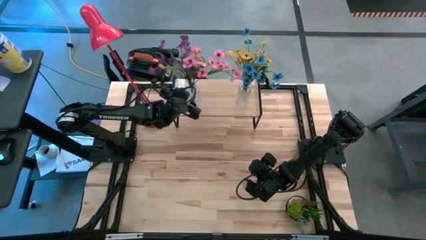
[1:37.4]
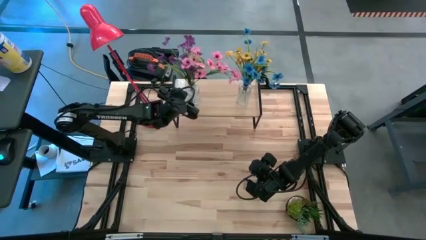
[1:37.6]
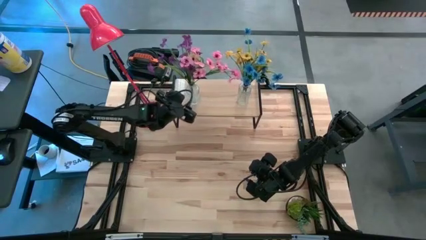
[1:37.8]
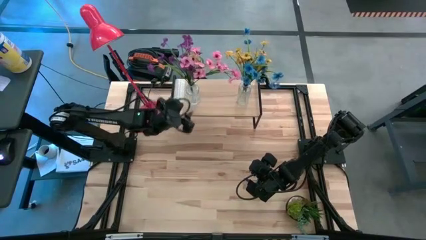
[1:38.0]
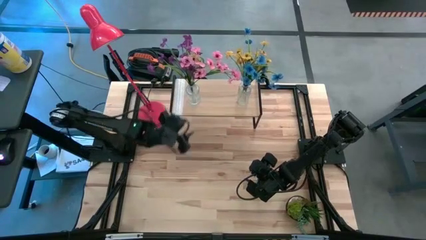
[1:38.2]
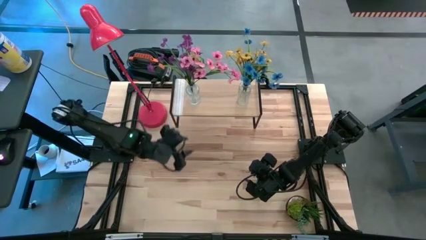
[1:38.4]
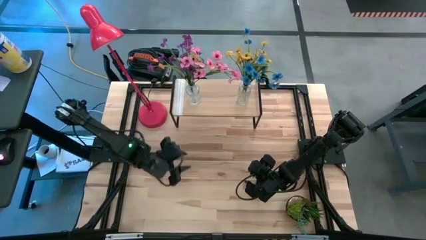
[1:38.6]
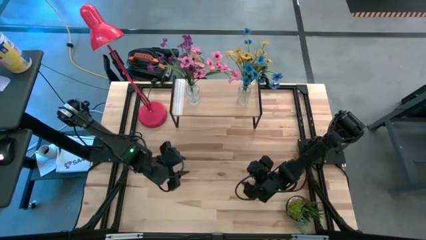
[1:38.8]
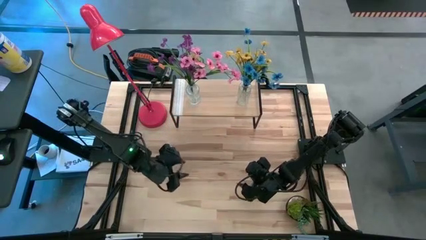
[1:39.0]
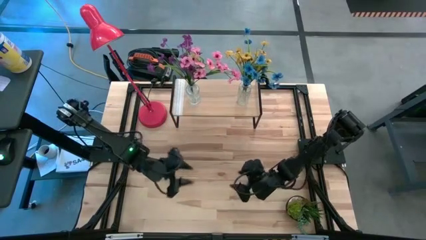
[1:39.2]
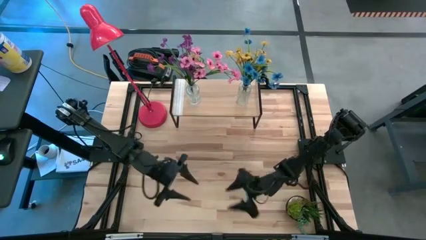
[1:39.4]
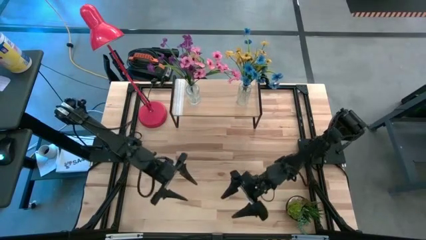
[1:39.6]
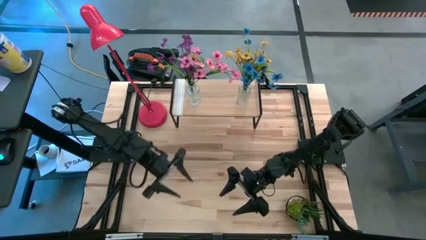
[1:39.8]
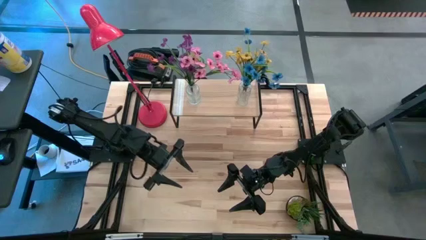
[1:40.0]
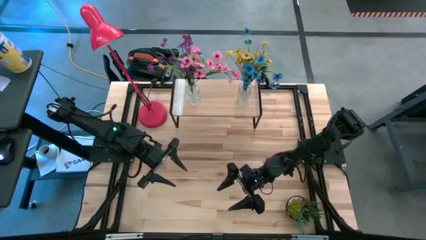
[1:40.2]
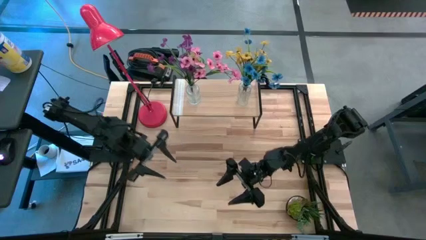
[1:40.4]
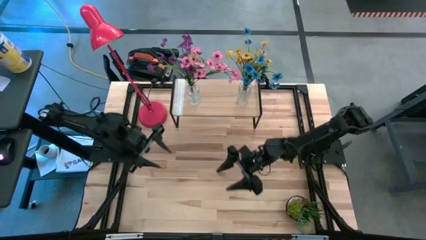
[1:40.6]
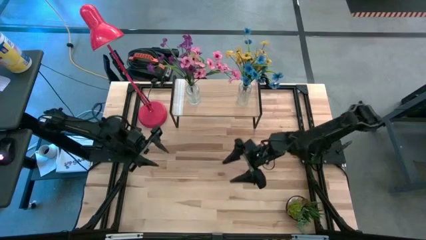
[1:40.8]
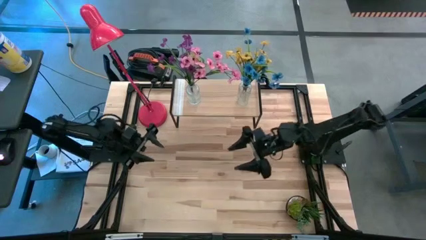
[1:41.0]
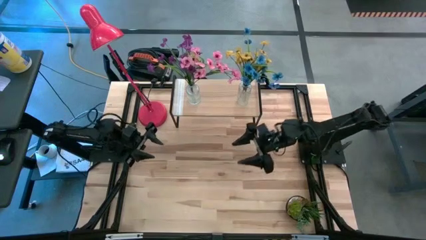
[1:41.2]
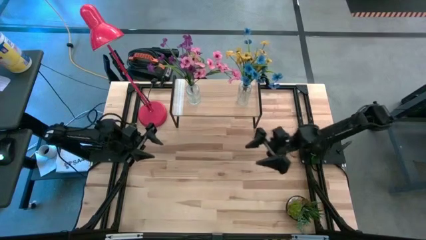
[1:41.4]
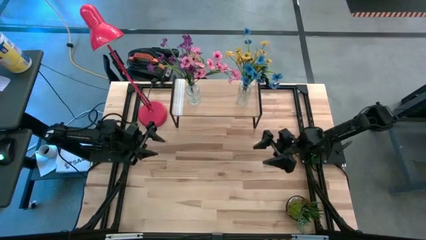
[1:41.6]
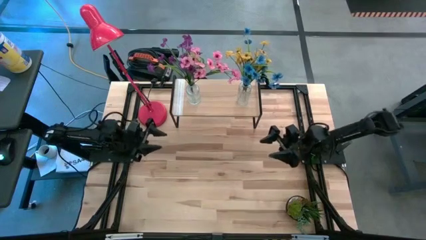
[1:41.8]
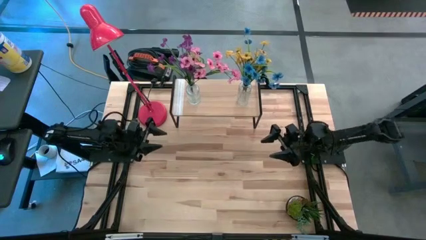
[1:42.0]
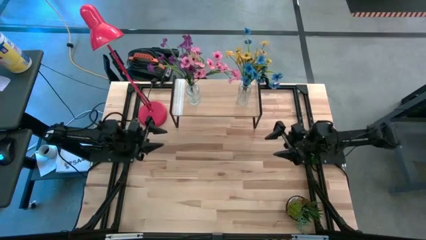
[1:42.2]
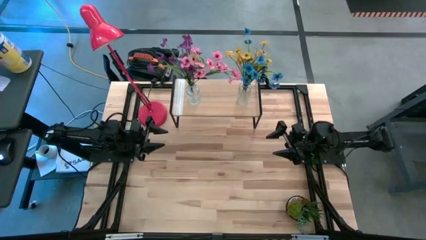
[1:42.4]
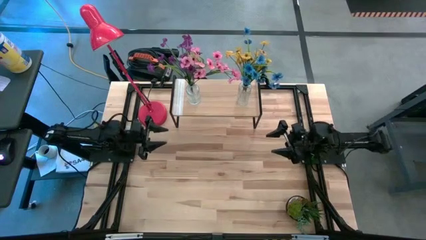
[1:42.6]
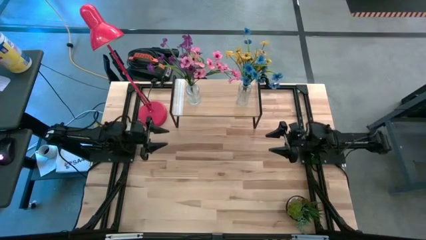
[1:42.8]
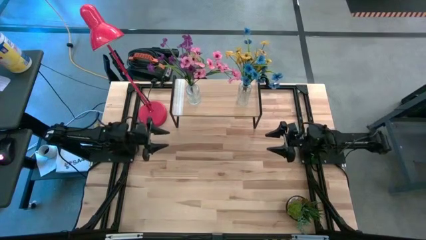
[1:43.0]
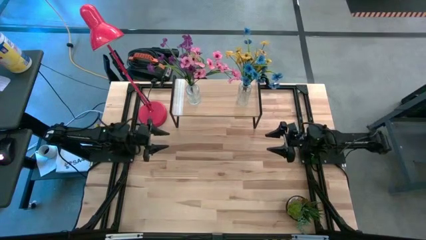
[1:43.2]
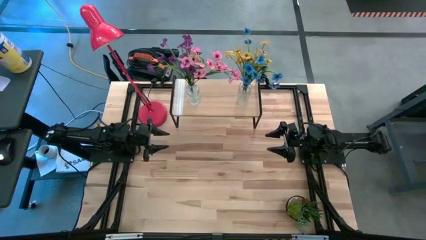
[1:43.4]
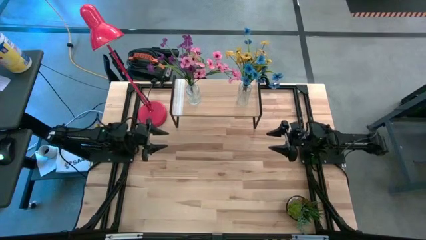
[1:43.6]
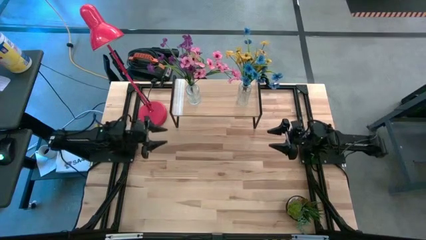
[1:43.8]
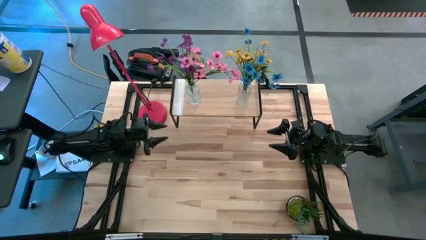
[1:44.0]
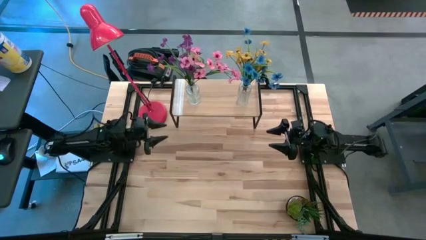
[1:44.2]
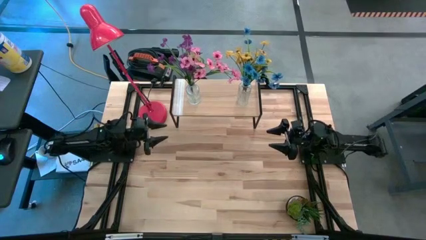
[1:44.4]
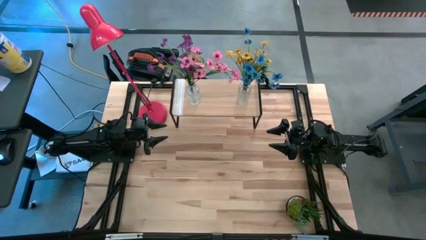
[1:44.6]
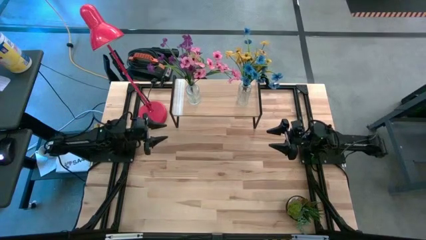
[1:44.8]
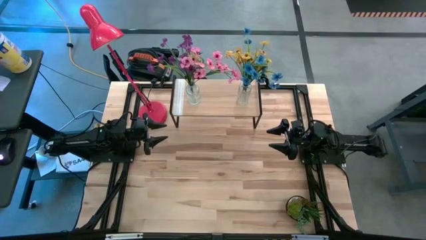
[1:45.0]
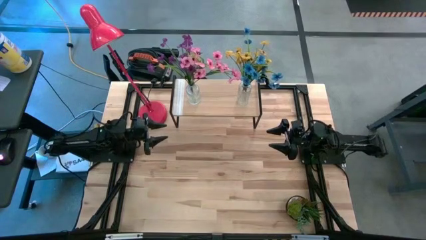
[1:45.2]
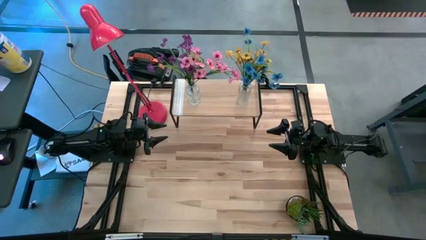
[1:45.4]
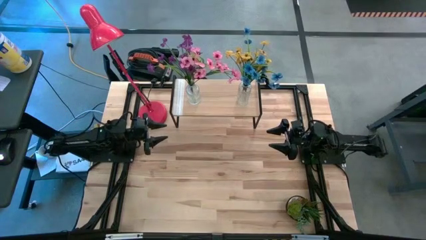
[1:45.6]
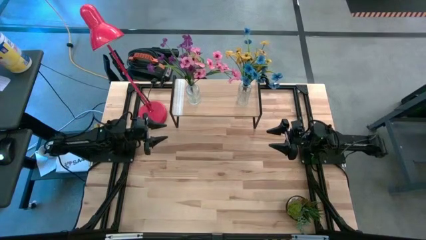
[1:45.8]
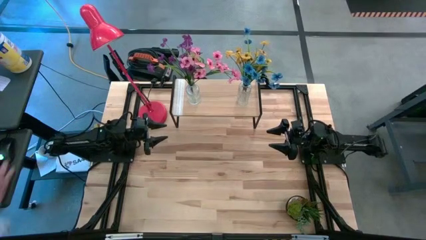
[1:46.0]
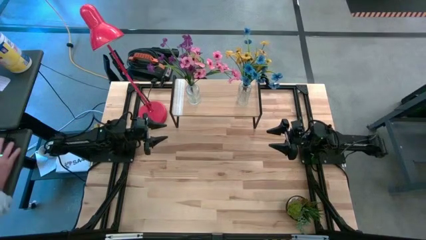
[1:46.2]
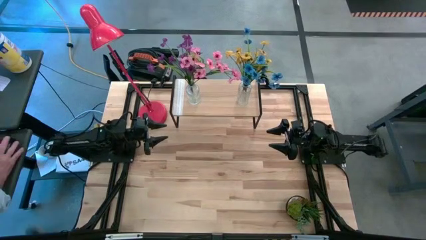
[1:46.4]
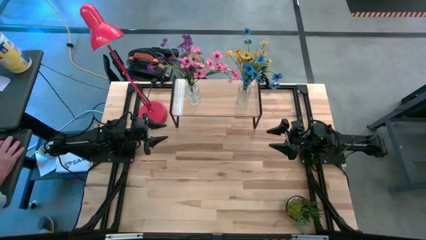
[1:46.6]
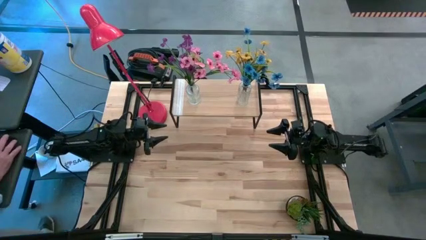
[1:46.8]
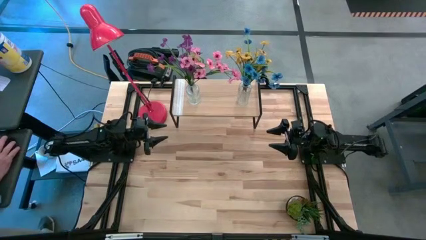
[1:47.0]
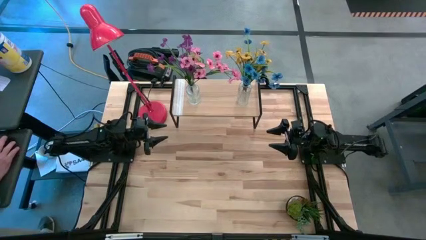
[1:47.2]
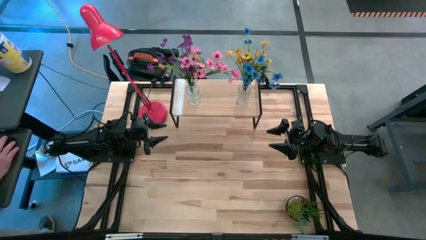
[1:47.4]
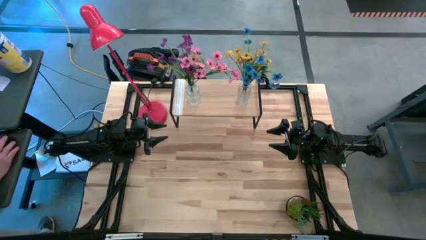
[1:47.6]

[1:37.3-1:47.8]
Task: Pick and place flowers into a vace then onto a shelf
Return to Home Position

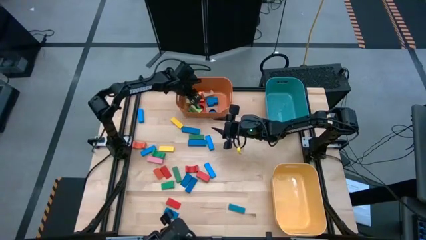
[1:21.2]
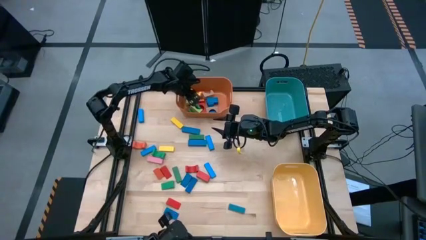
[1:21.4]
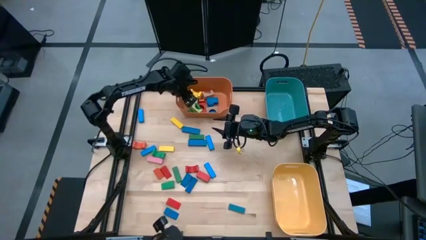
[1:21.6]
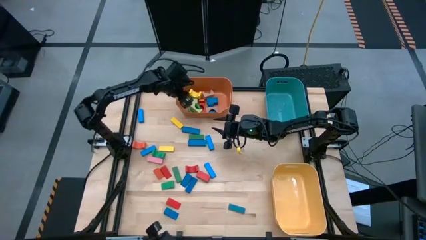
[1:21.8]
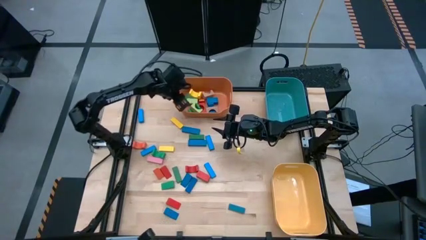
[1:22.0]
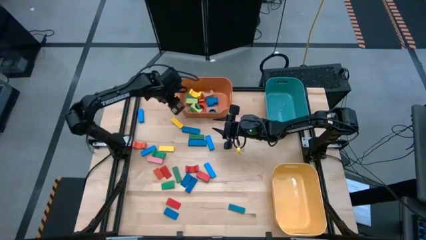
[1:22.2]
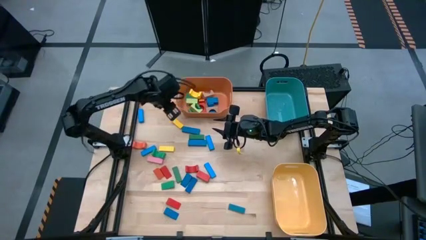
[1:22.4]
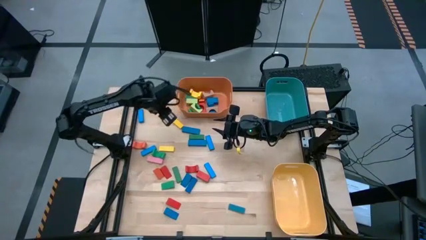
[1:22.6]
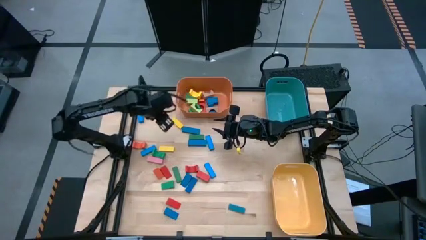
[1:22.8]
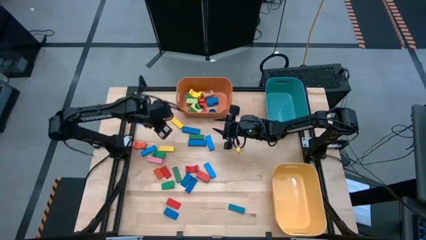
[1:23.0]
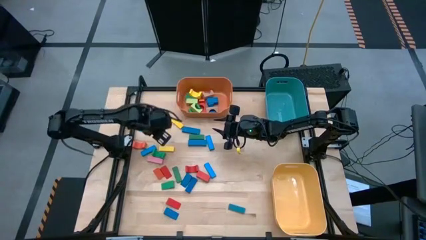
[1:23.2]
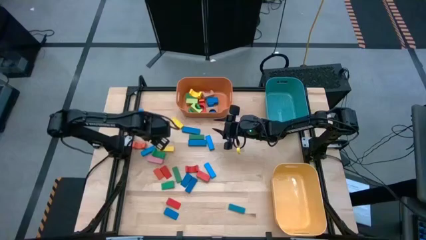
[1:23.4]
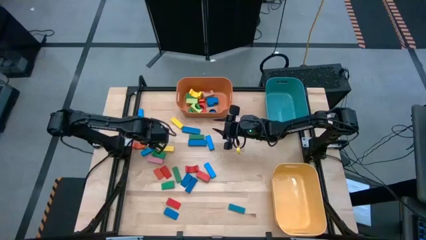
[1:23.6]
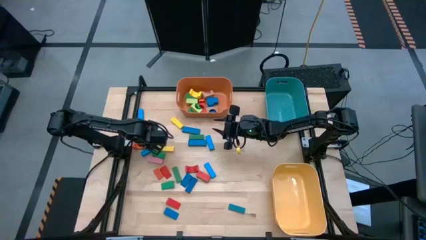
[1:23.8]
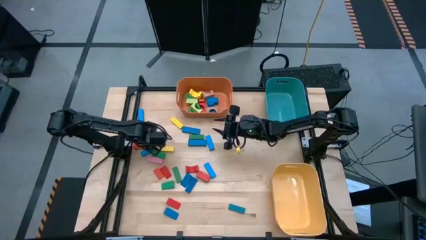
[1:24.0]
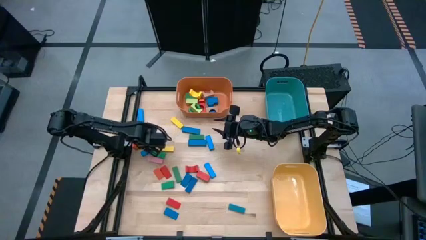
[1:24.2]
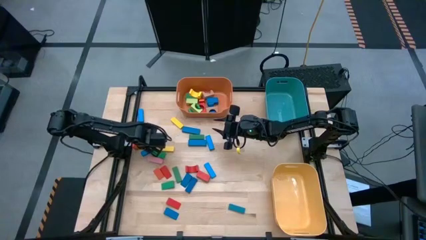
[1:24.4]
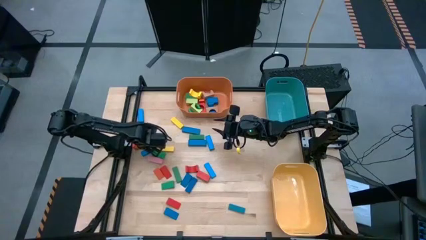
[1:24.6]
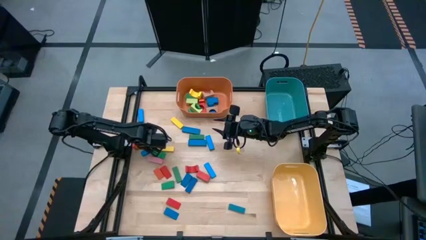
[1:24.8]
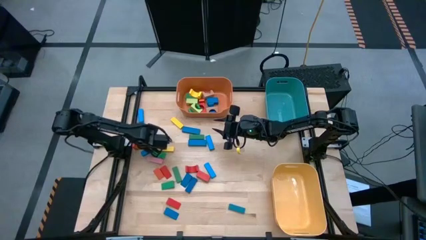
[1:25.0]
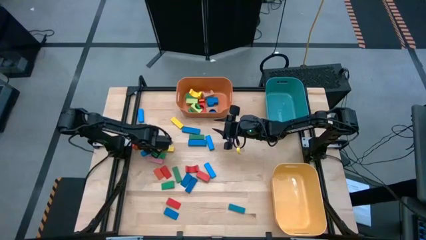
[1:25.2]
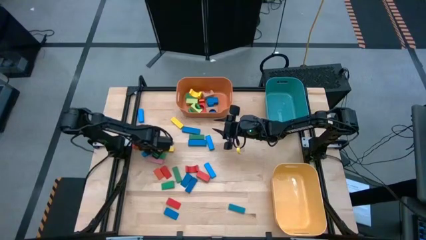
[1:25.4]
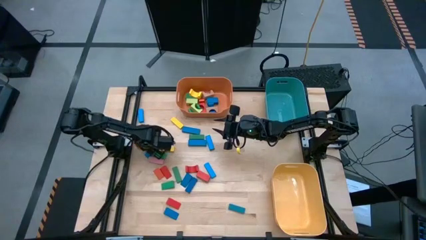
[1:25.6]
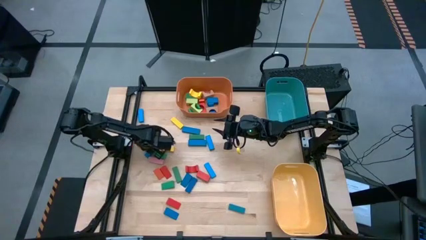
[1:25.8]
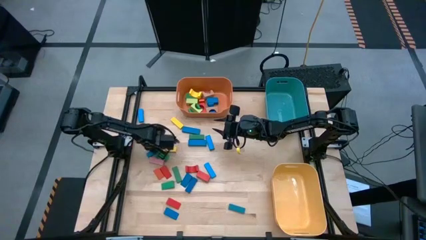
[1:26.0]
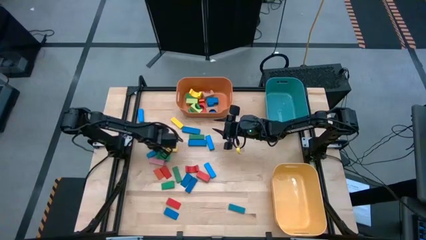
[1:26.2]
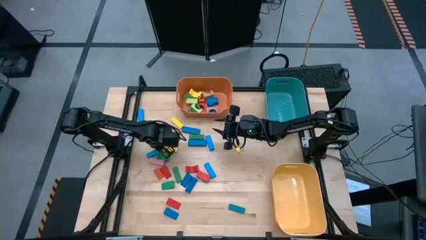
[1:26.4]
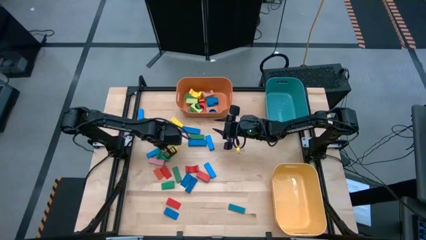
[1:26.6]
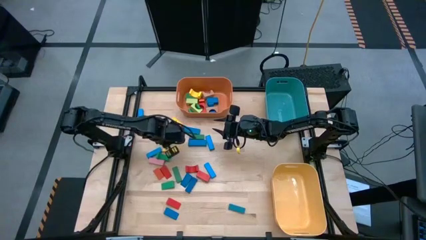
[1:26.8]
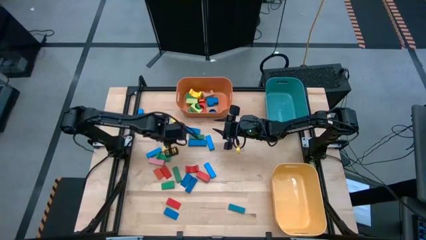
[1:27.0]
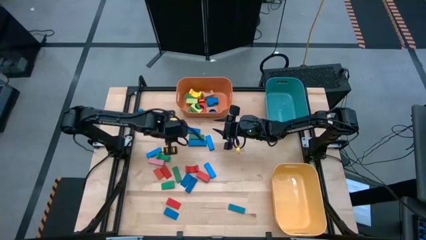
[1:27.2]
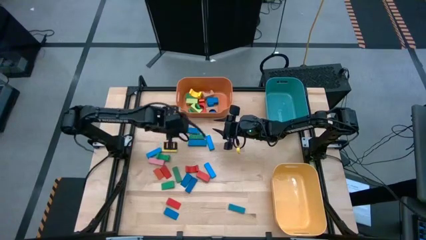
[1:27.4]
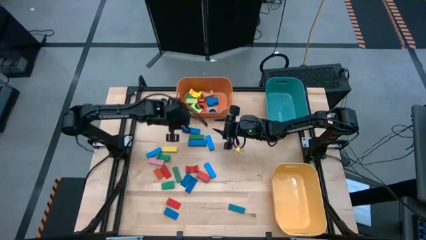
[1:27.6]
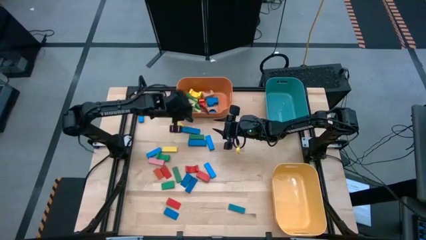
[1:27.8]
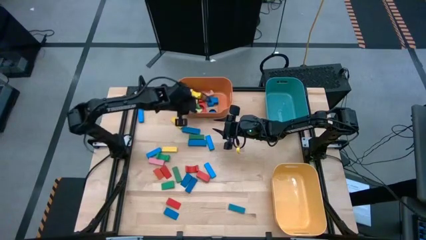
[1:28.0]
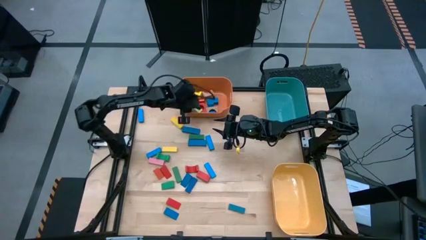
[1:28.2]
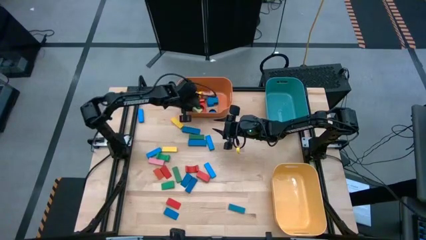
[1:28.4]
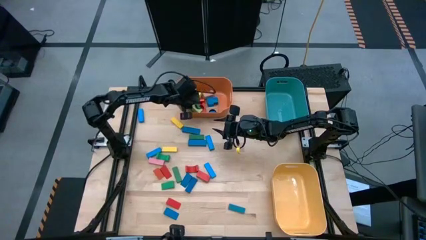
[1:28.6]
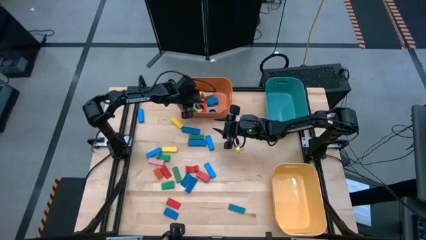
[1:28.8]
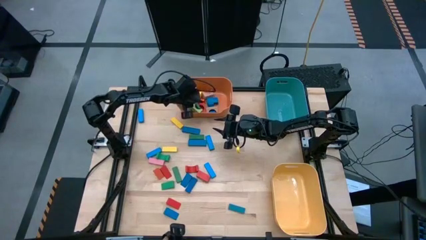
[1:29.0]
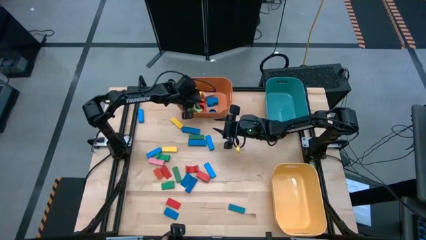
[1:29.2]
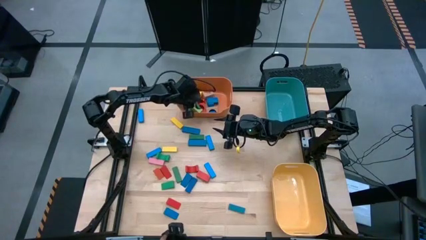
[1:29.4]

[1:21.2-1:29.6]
Task: Sort blocks by size
Put the orange arch block into the orange bin
